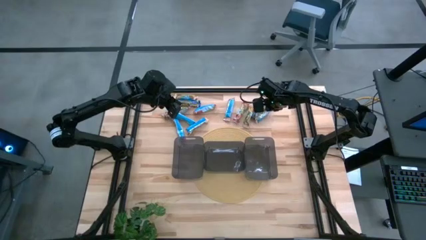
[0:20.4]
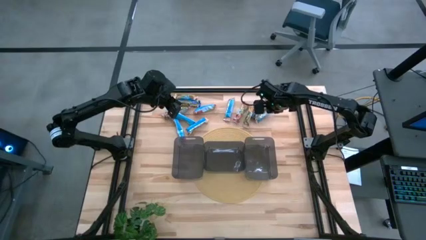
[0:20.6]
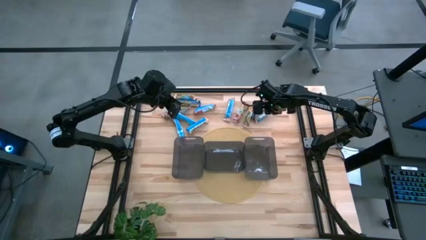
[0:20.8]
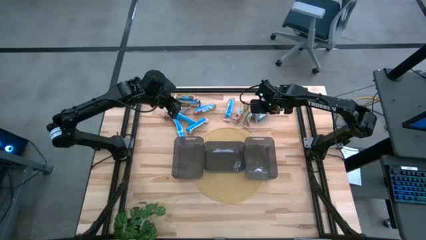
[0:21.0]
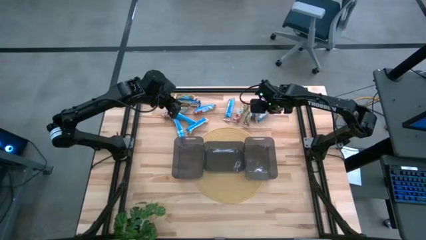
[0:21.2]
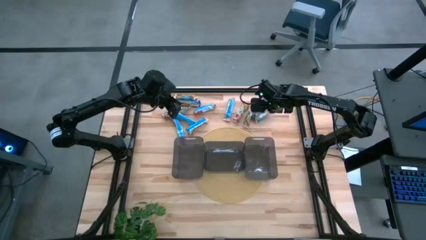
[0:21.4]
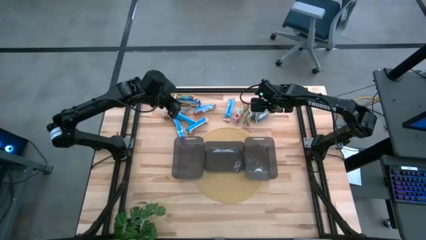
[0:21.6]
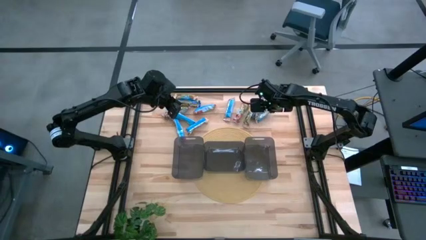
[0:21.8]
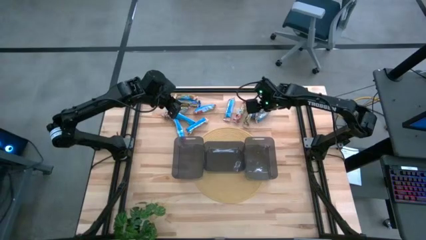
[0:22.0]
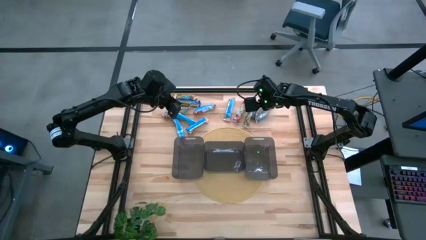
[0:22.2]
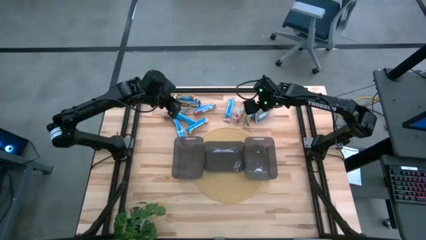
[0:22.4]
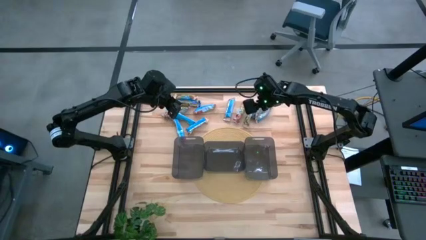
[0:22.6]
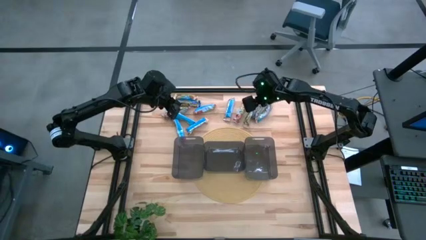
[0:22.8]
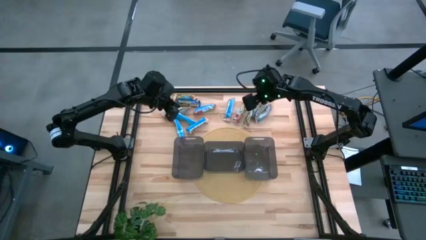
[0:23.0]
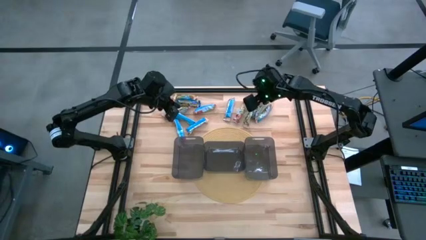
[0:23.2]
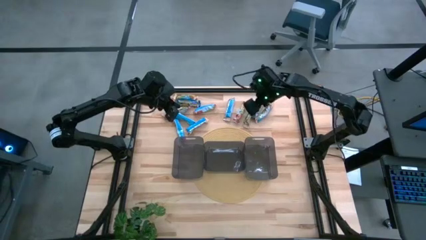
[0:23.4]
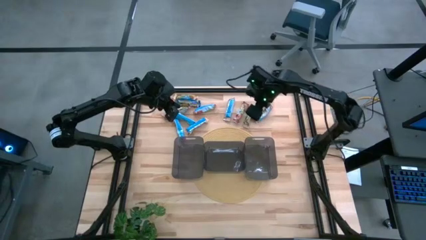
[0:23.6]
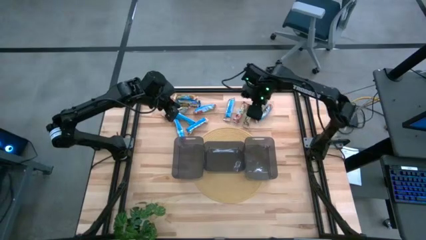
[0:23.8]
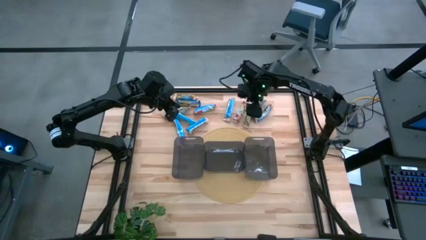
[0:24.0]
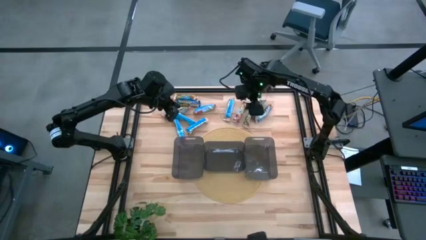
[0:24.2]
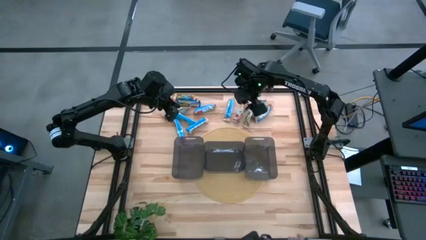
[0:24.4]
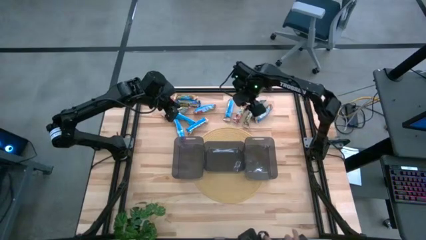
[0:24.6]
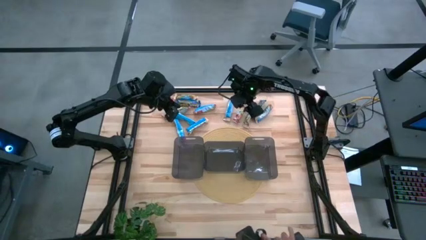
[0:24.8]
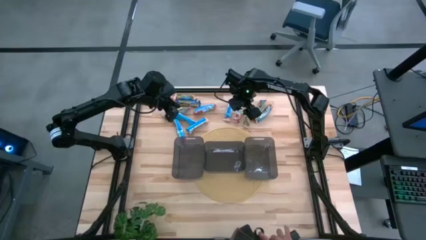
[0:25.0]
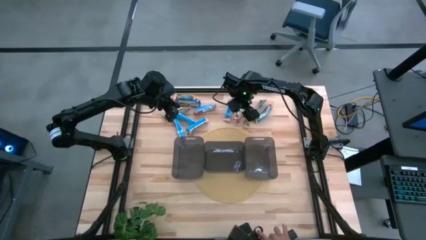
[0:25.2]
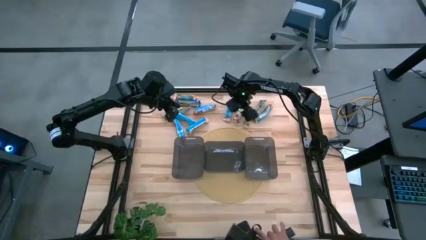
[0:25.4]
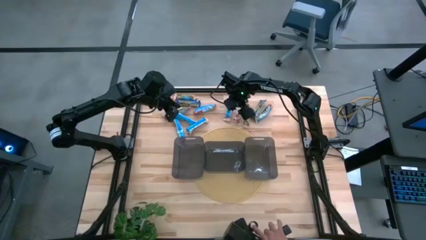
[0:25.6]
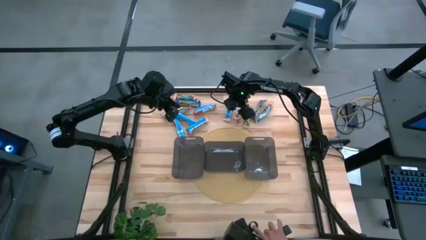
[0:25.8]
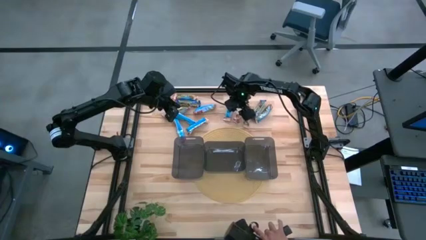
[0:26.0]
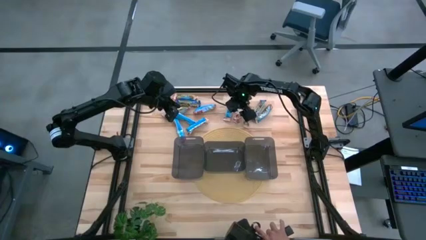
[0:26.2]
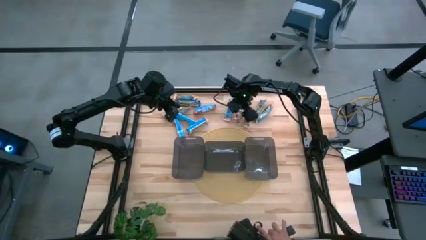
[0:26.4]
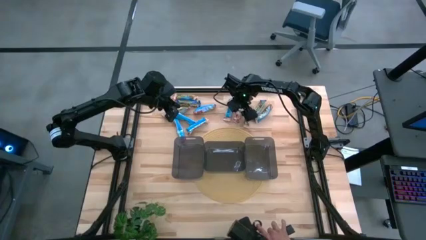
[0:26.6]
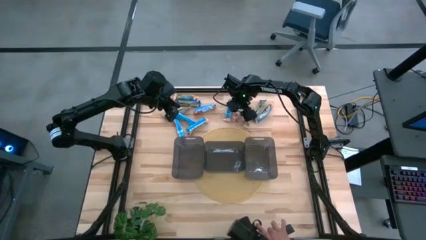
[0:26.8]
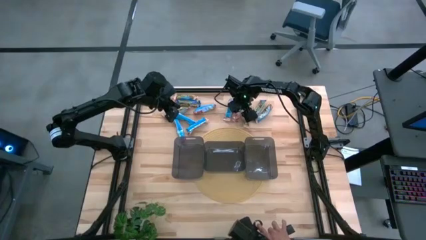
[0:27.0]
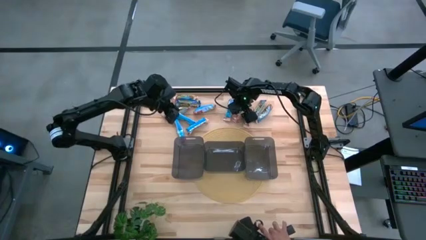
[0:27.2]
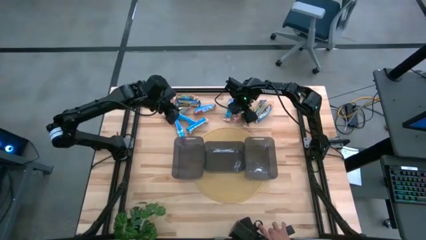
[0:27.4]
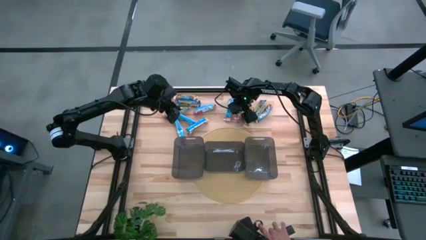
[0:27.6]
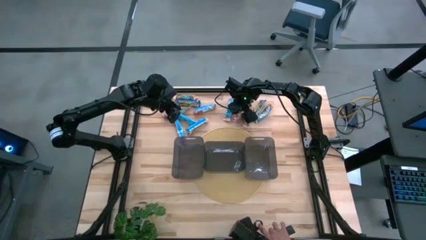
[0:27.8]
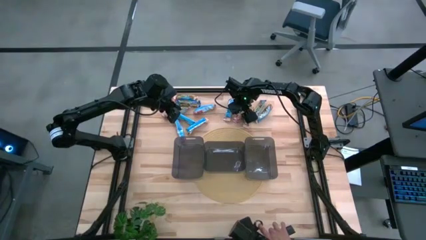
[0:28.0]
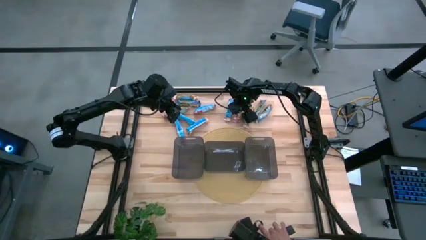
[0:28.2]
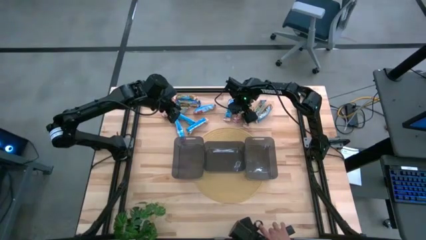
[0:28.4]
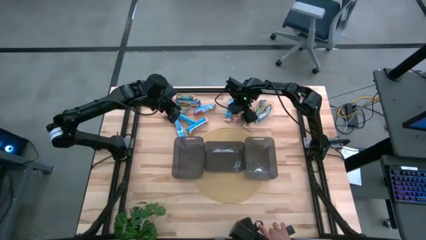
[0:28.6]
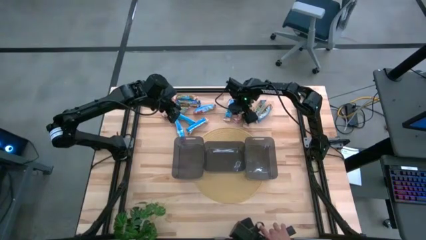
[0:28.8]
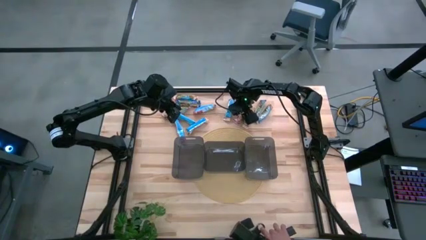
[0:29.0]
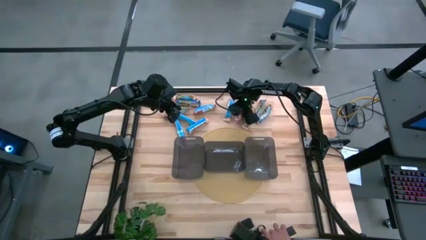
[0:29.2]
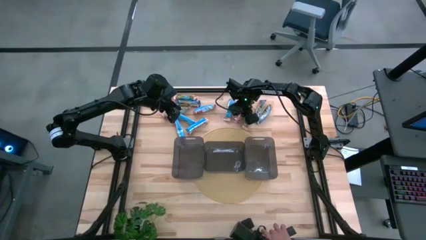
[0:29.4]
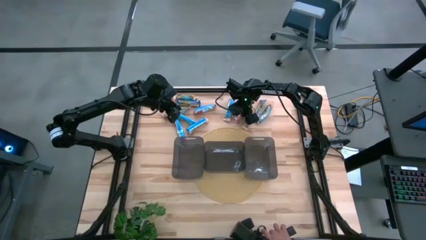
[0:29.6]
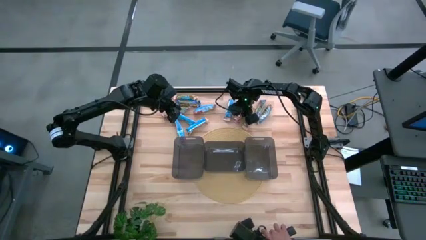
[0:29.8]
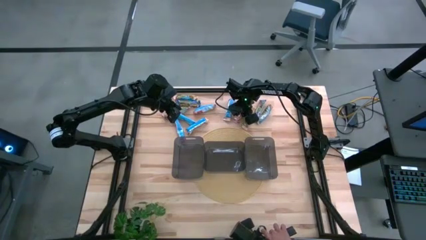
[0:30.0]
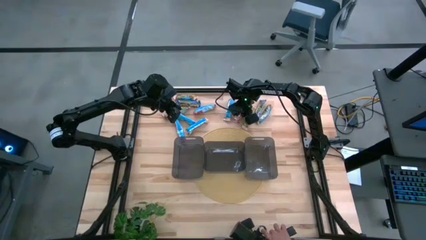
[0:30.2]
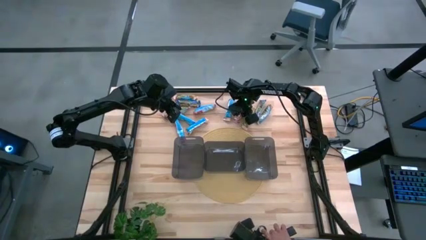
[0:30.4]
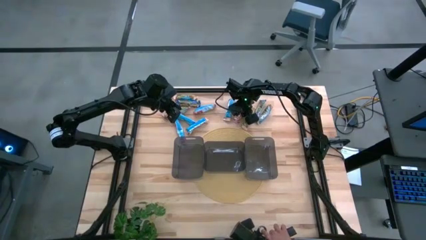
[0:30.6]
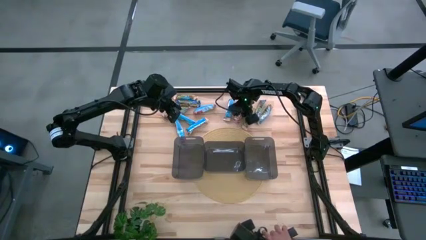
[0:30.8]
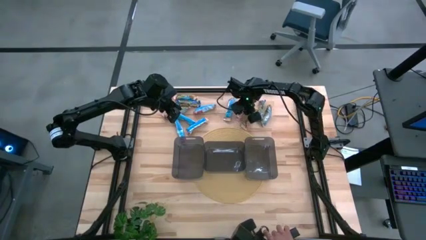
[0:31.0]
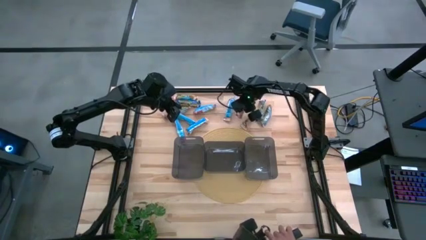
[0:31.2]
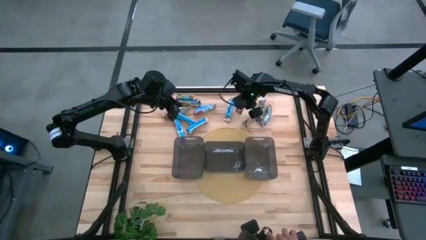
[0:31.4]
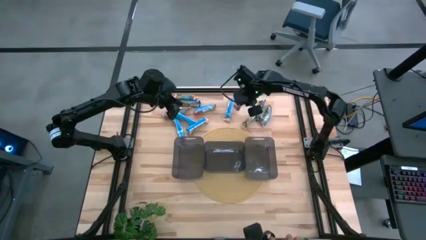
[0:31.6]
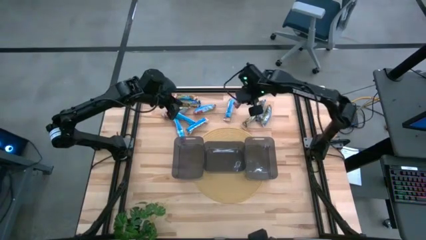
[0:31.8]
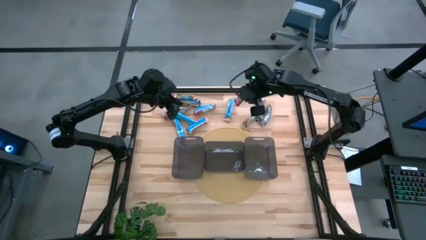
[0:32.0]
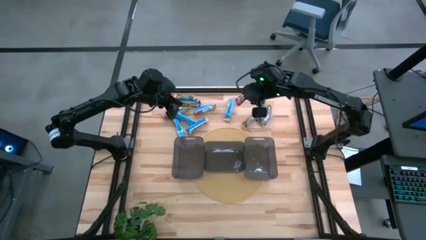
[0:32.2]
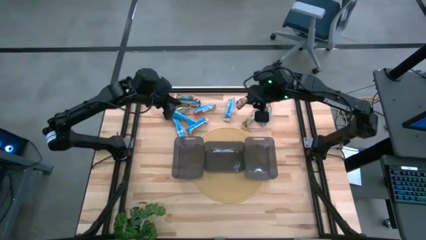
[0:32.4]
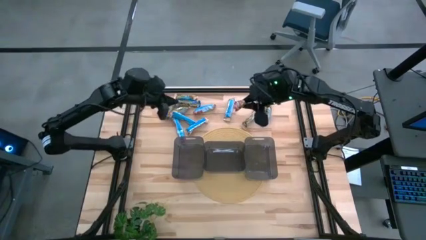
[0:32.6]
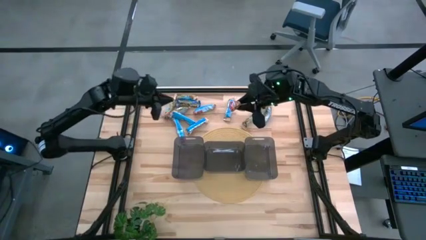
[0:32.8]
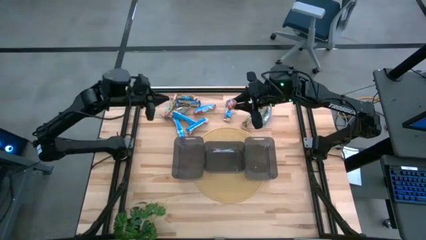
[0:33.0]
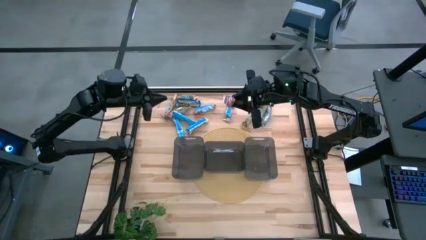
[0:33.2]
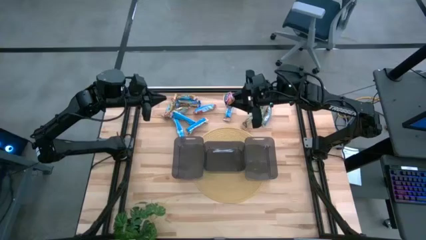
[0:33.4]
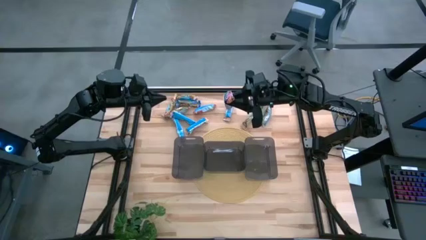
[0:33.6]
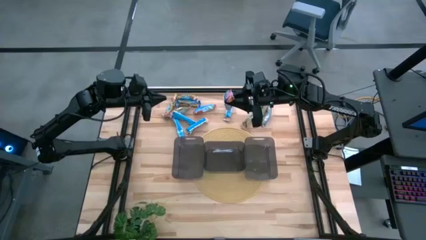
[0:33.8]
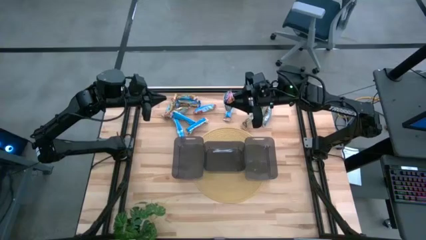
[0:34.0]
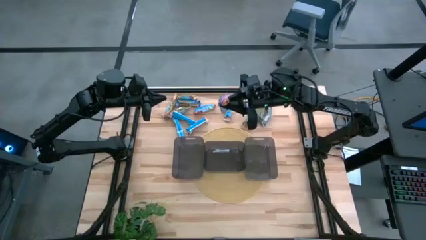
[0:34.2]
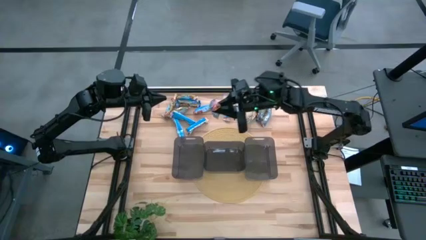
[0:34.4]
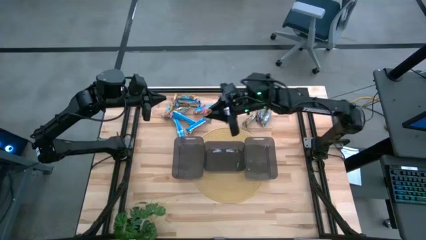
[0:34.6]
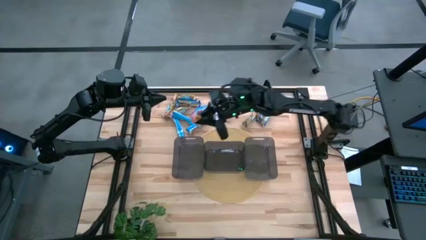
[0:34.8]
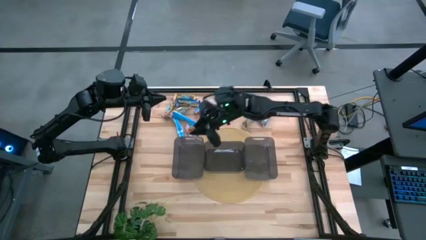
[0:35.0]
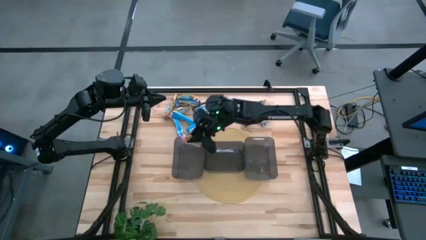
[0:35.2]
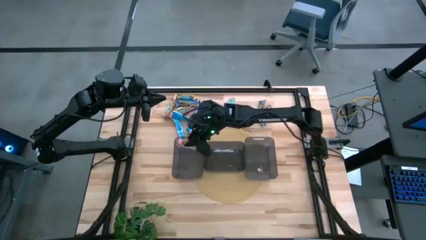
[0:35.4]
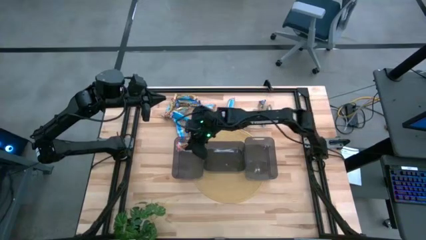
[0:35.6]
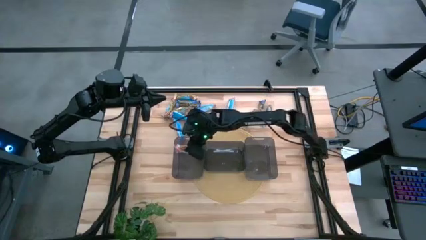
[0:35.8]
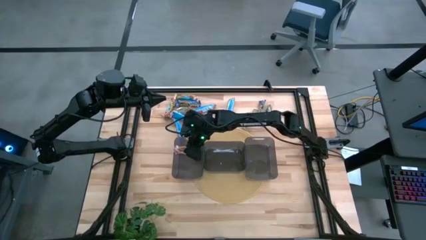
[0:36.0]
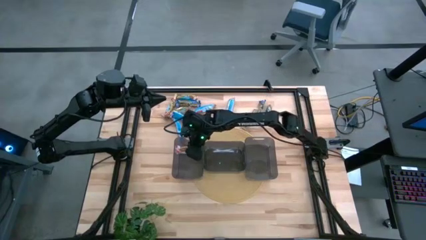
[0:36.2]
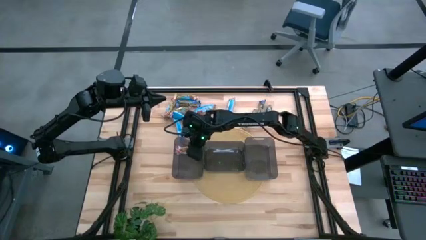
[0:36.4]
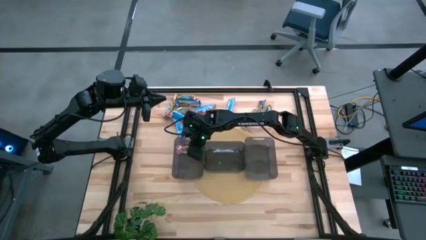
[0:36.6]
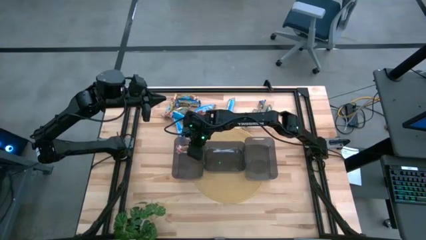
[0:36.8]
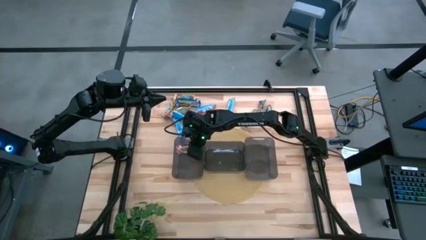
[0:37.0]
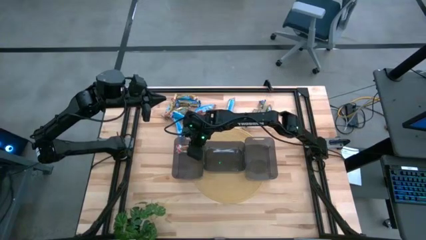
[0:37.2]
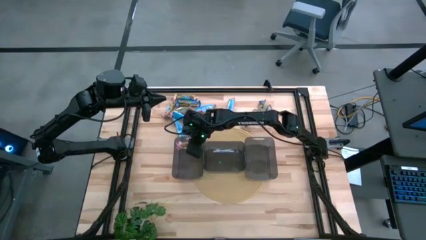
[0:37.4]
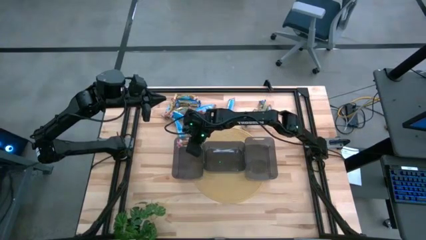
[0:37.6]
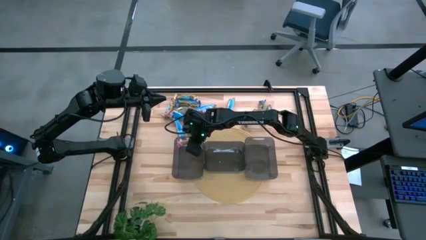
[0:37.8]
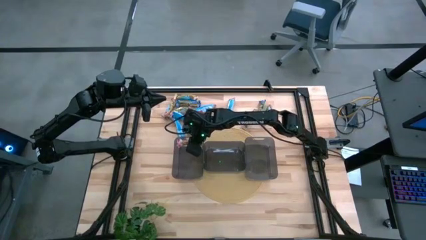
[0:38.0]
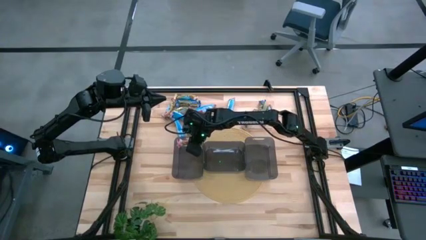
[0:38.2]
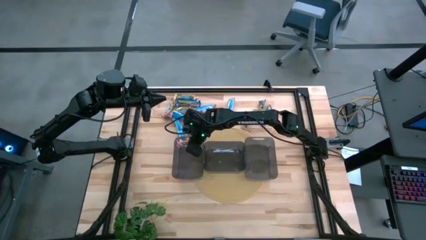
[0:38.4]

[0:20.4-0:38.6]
Task: Pick and place Granola Bars by type
Put the red granola bar into the left black bin
